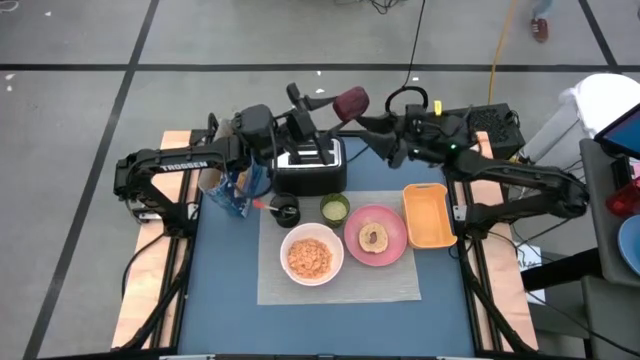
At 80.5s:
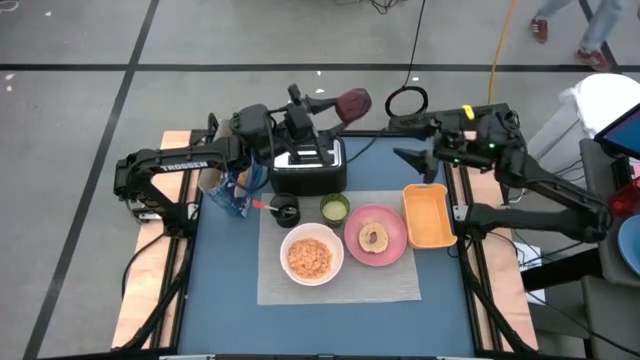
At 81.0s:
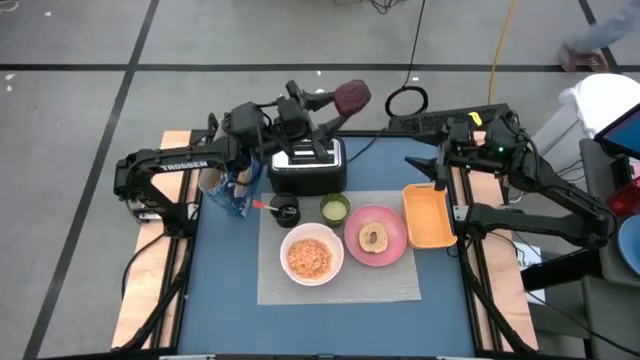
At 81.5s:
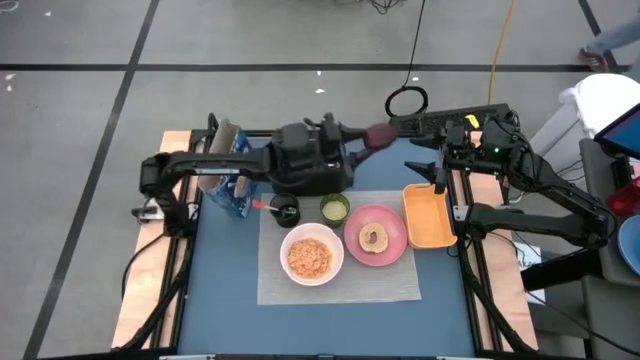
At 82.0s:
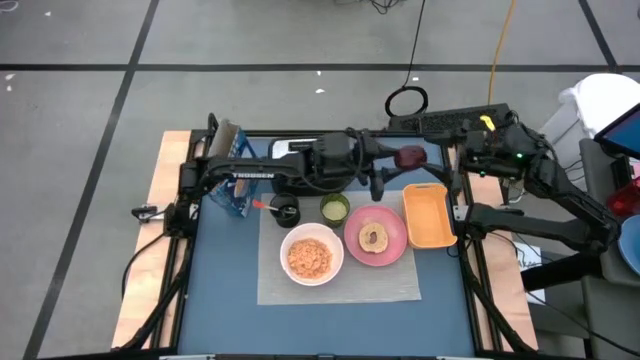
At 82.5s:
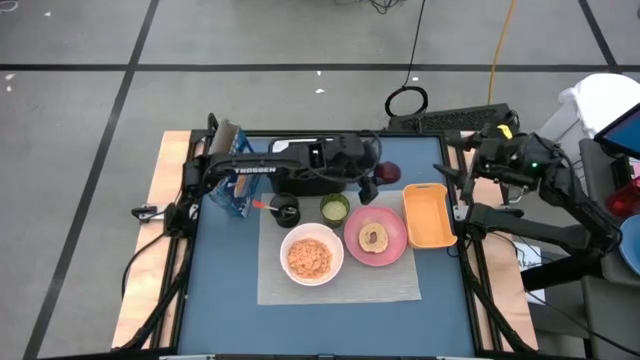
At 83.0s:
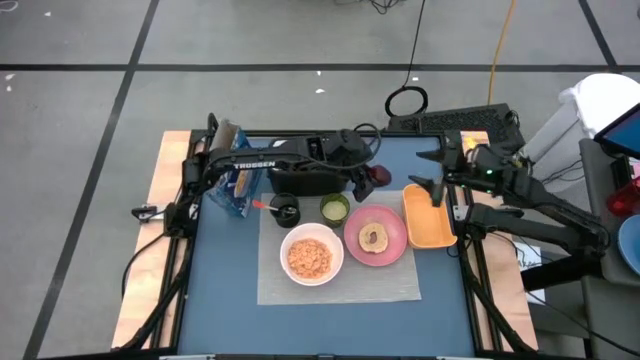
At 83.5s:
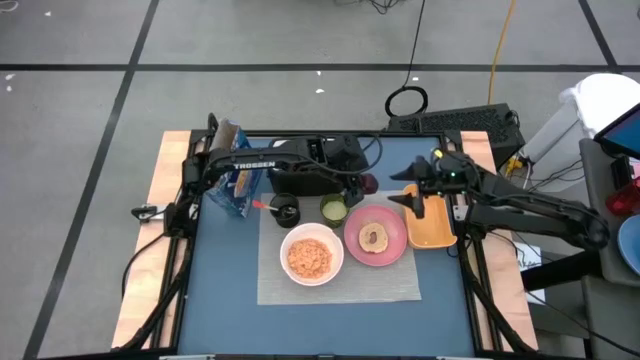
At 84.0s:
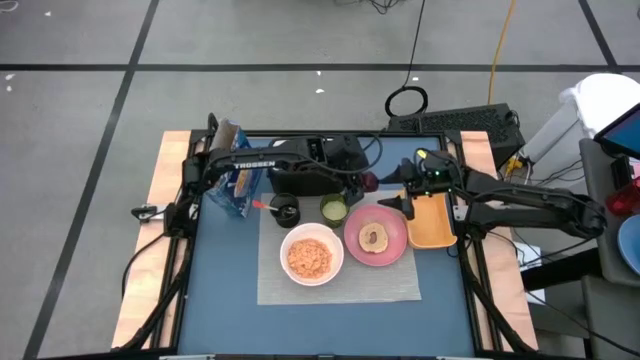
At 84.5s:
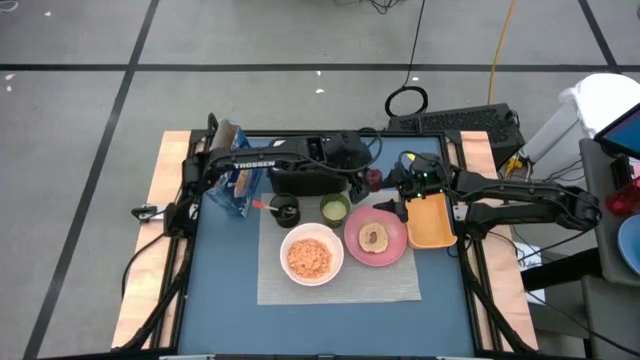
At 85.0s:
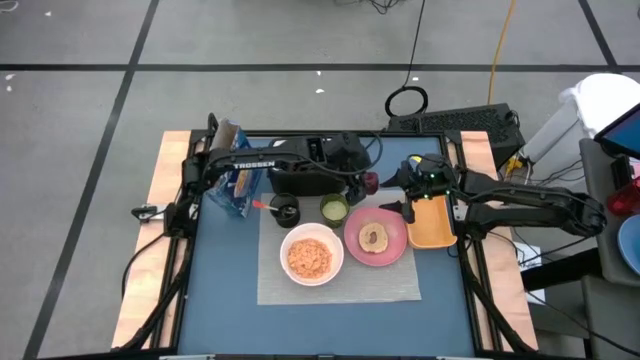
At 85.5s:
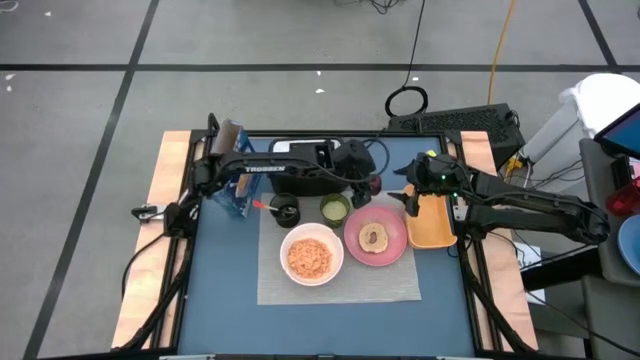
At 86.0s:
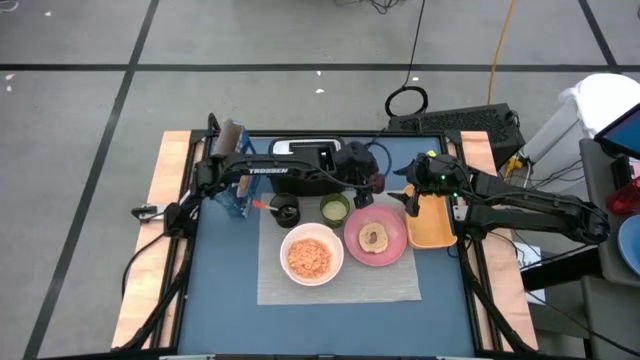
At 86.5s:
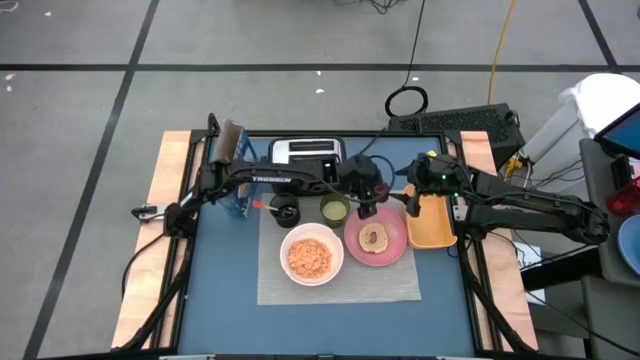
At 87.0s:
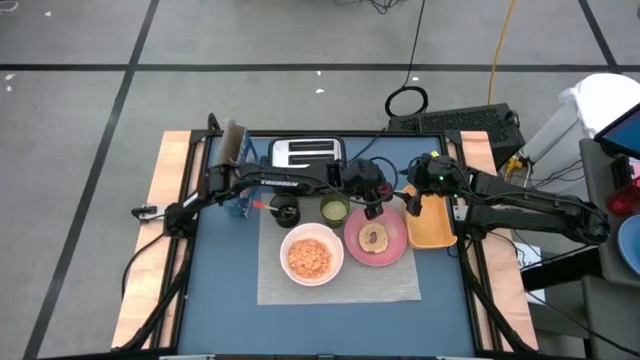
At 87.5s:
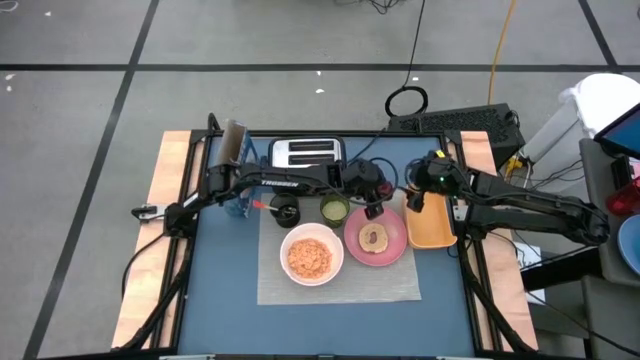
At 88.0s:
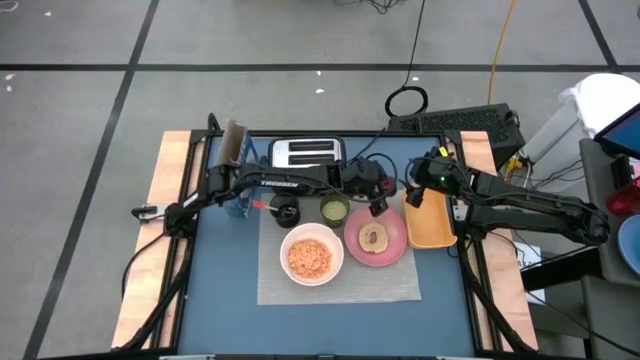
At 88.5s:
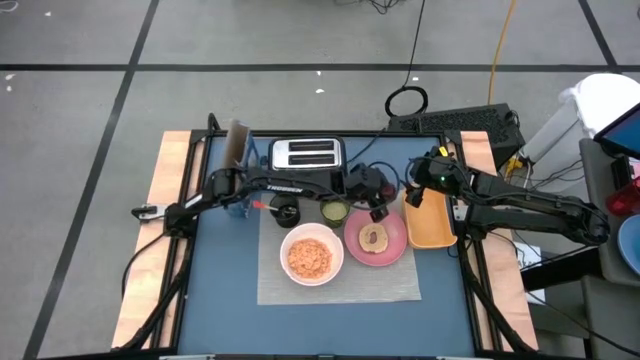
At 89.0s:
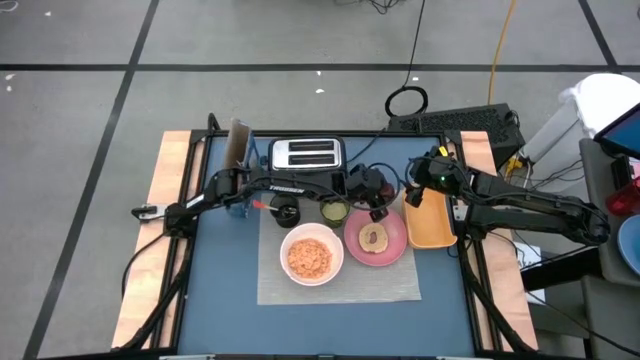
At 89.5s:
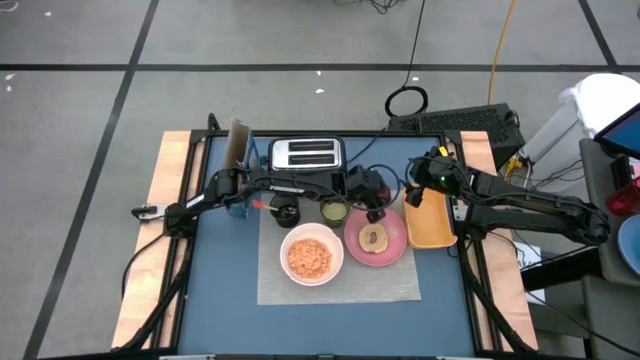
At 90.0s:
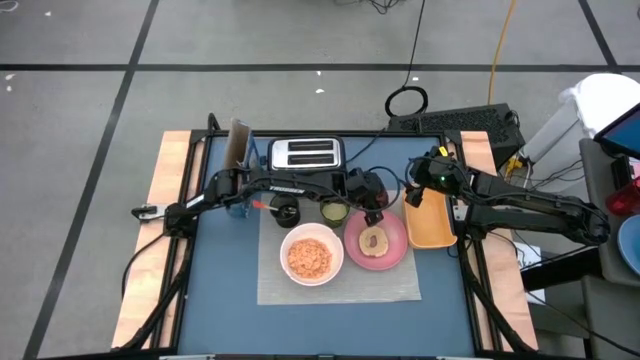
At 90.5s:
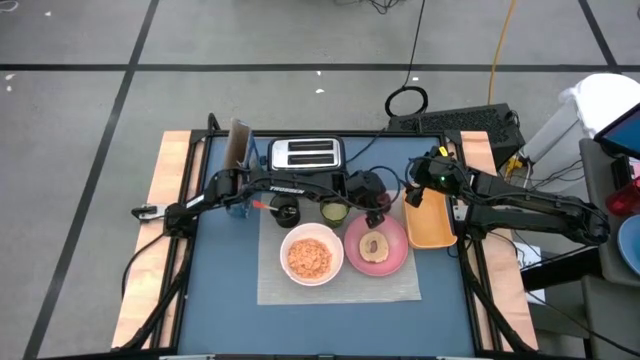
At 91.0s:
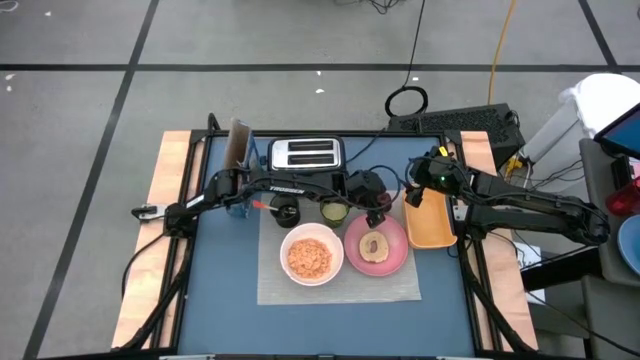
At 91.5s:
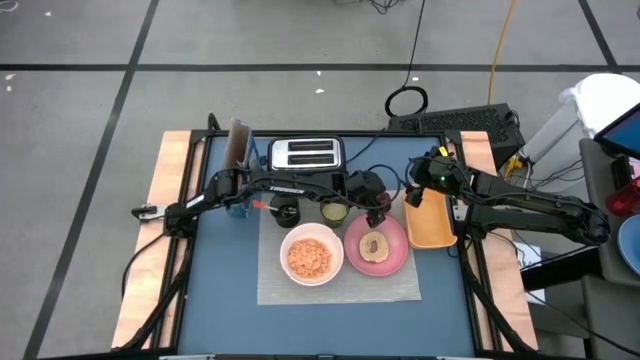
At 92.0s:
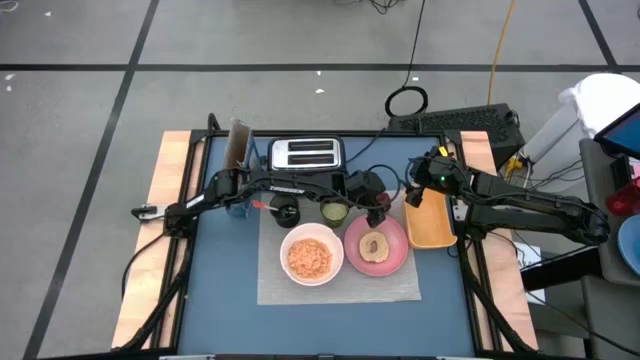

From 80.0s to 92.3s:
Task: Arrange a breakfast setting
Put the apple on the top right of the gray mat

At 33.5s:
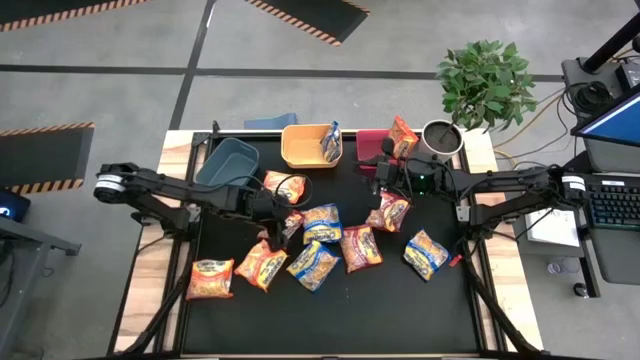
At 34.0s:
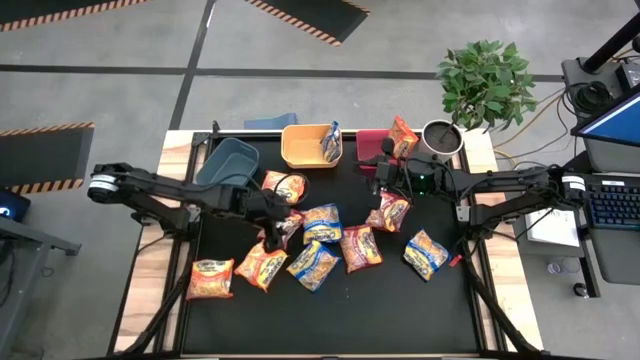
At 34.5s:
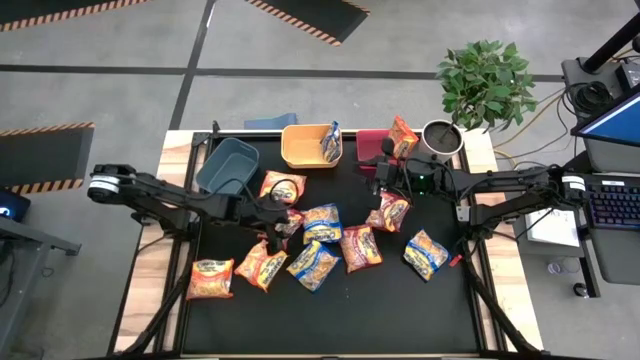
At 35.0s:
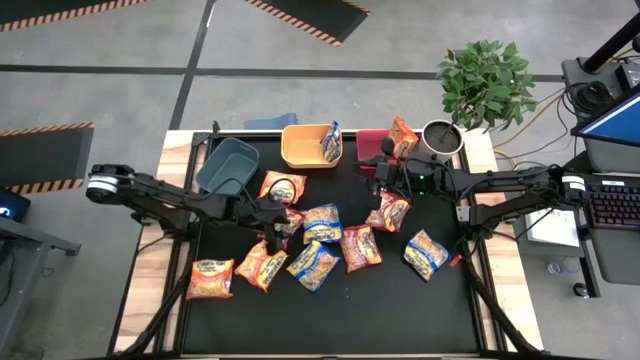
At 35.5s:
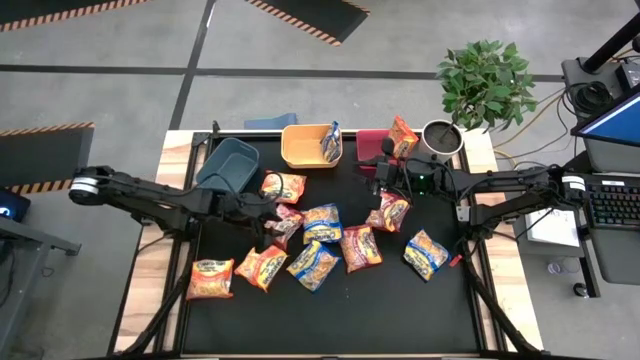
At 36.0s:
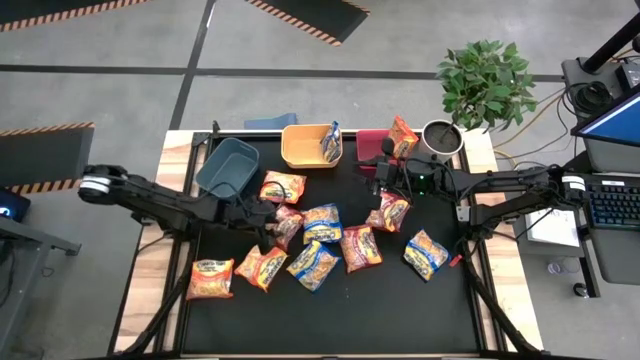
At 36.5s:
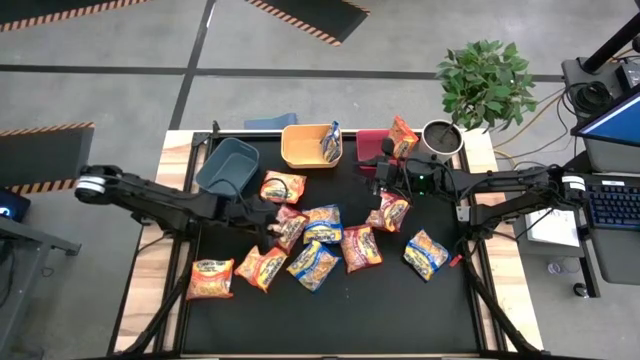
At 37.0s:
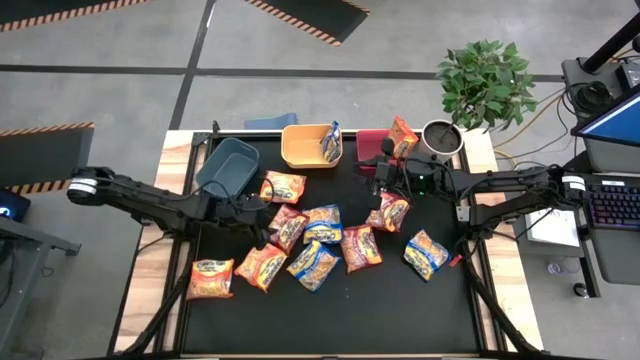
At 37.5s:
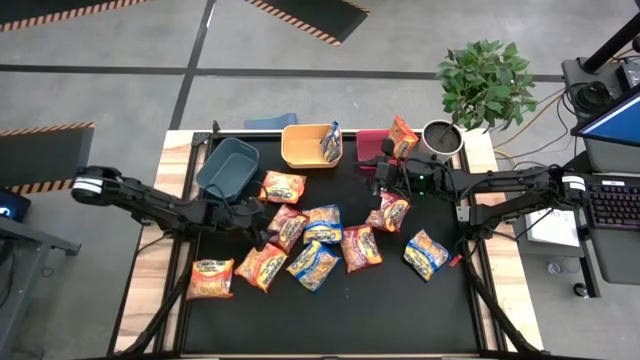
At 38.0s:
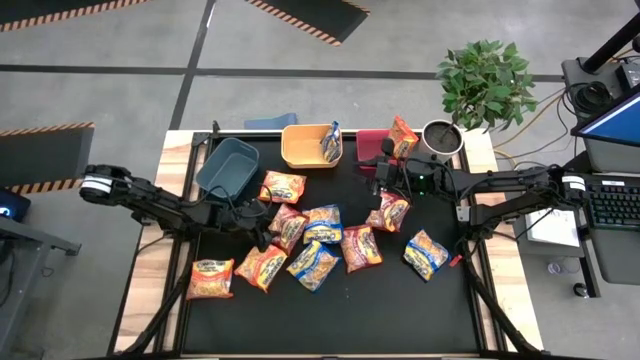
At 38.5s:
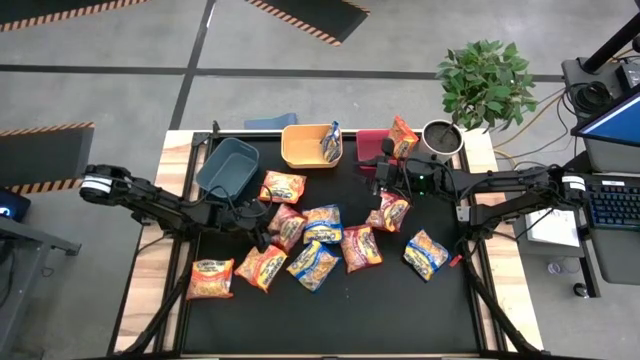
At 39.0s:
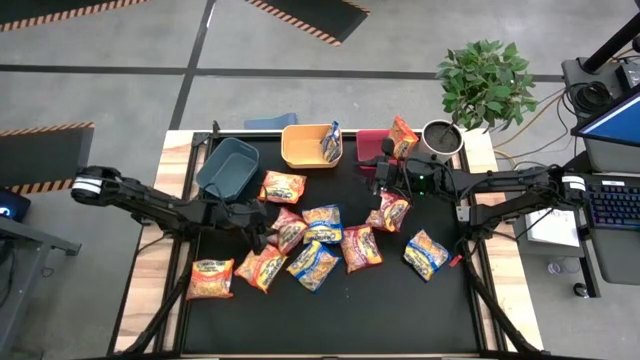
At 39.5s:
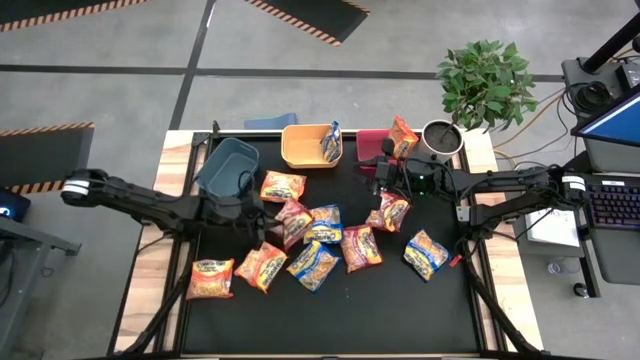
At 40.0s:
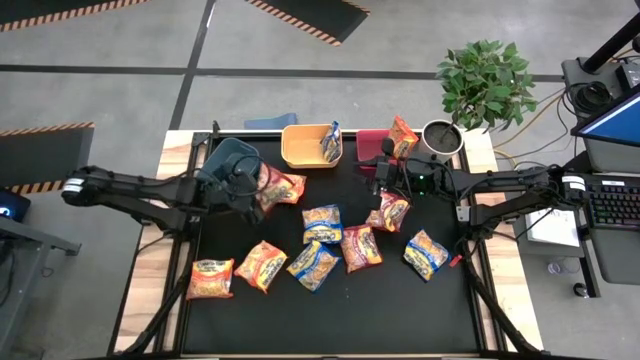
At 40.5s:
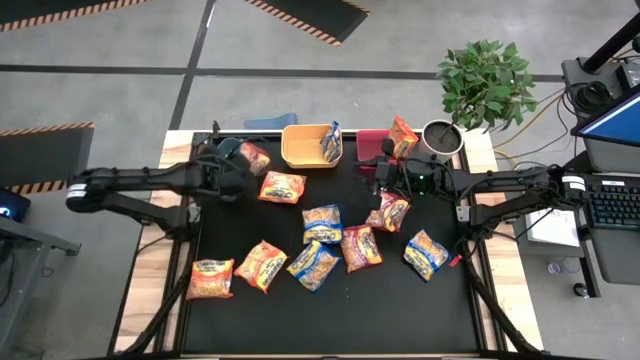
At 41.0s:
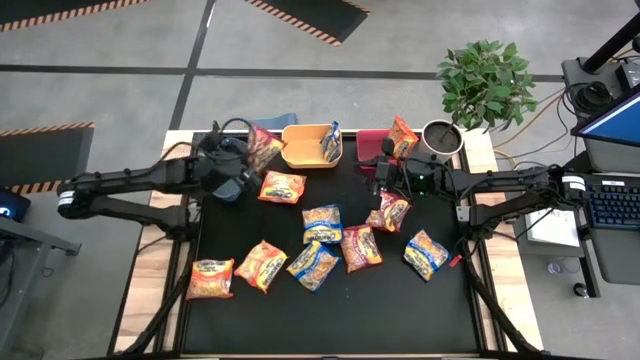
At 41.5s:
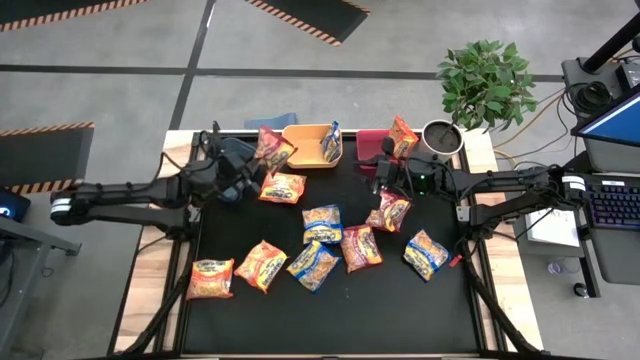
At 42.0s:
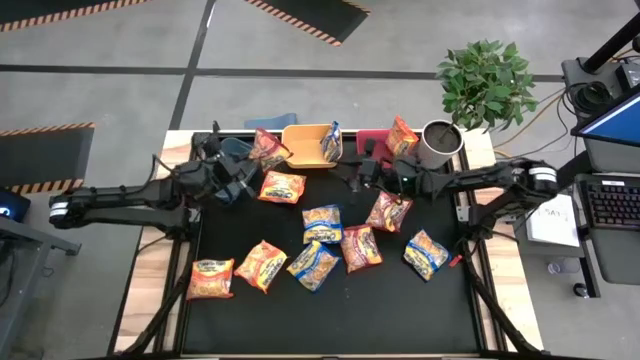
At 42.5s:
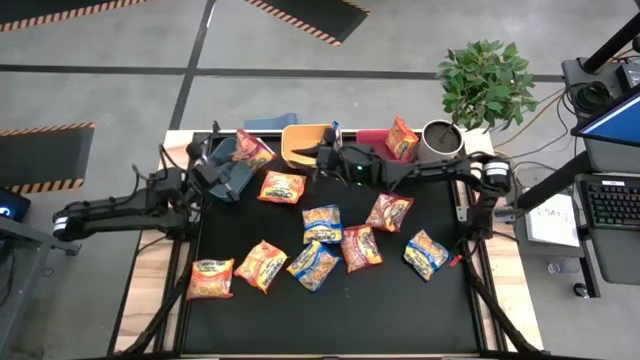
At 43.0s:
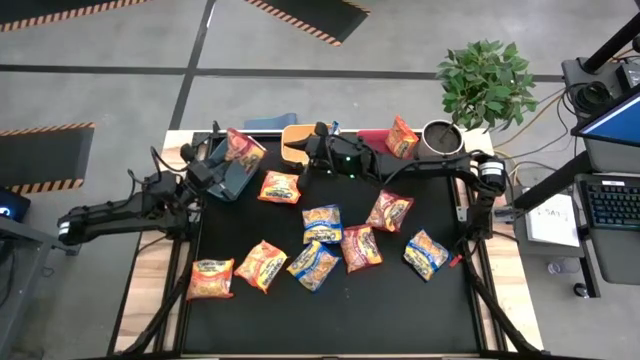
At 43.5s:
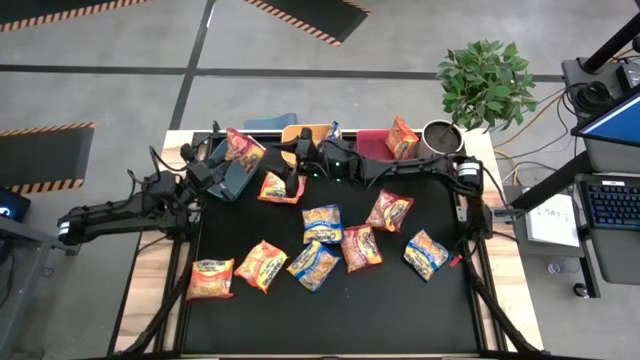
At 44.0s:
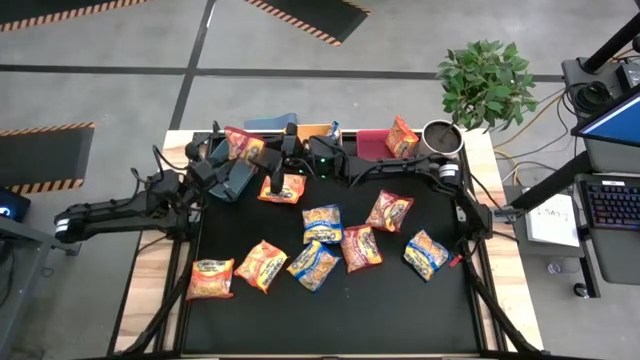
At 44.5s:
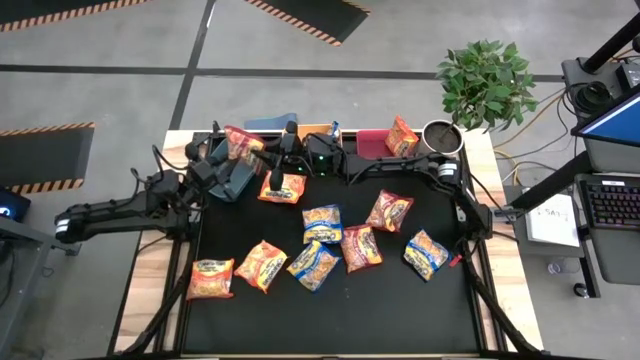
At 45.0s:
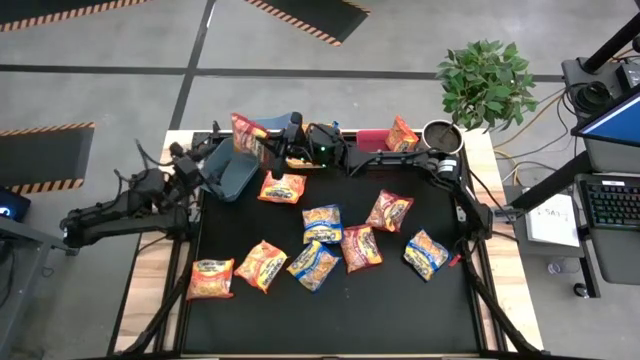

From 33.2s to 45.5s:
Task: Sort Maruchan noodles
Put the red noodle into the blue bin
